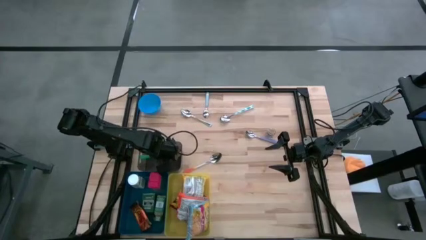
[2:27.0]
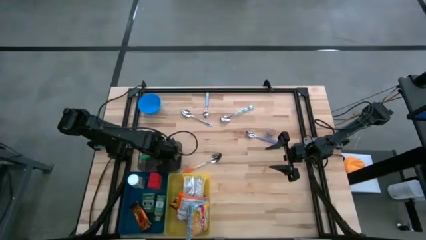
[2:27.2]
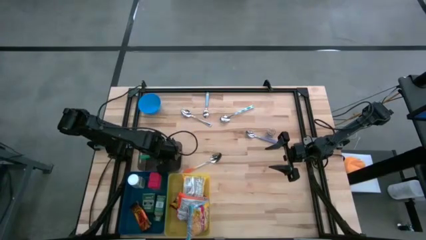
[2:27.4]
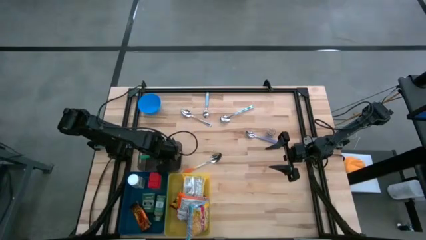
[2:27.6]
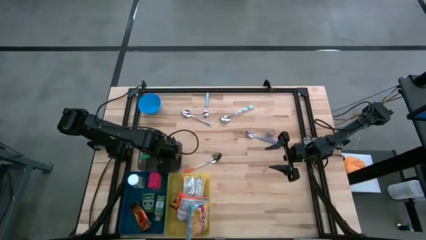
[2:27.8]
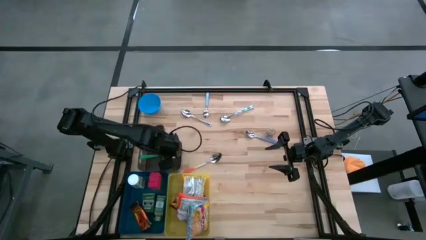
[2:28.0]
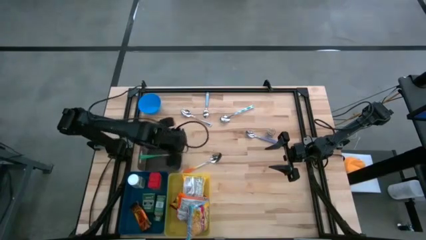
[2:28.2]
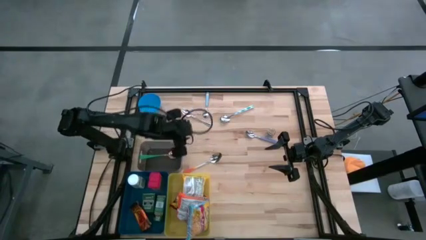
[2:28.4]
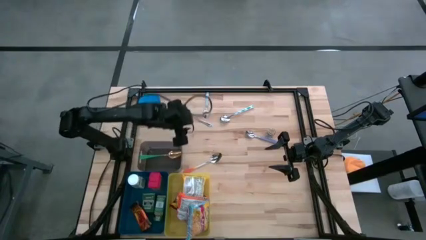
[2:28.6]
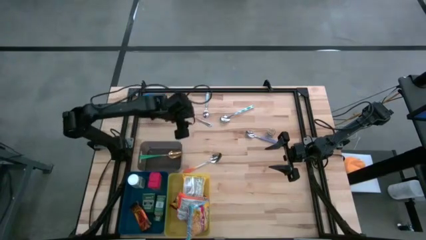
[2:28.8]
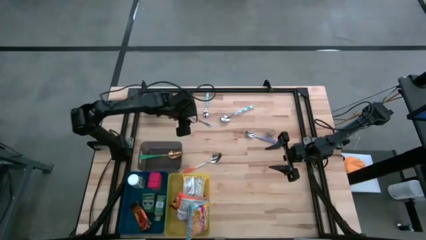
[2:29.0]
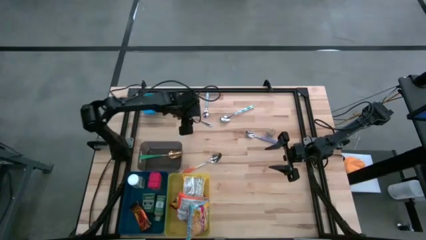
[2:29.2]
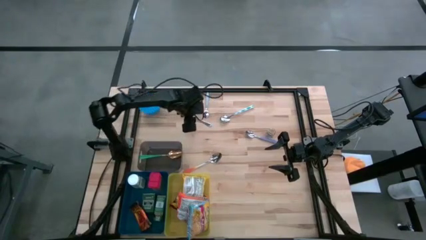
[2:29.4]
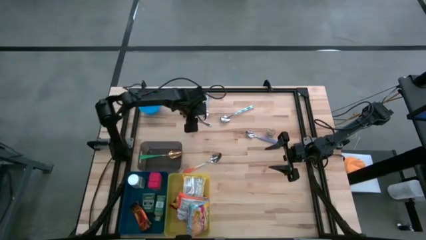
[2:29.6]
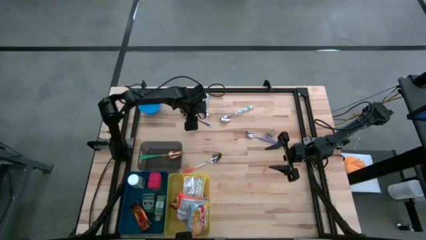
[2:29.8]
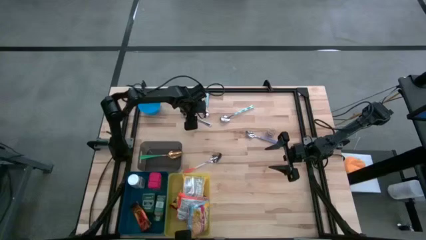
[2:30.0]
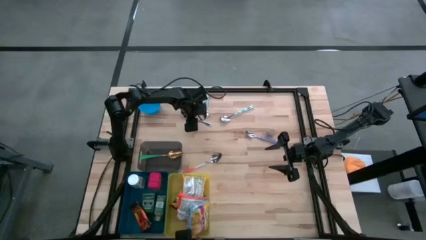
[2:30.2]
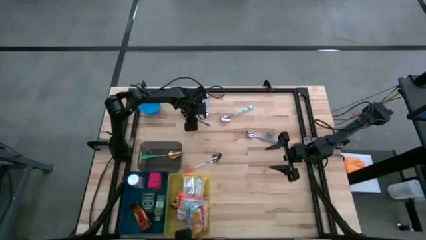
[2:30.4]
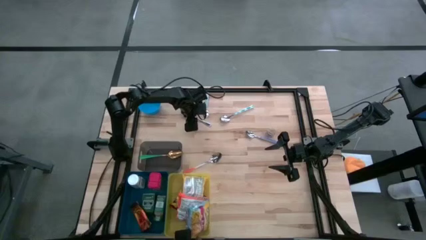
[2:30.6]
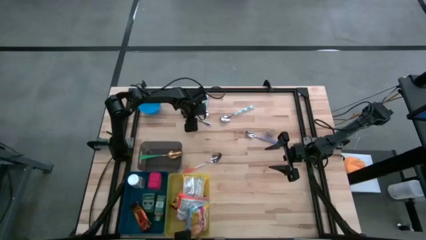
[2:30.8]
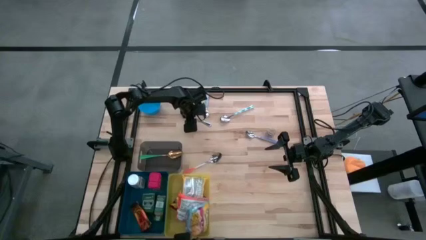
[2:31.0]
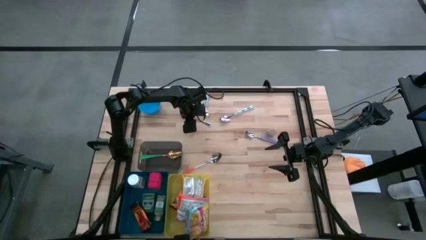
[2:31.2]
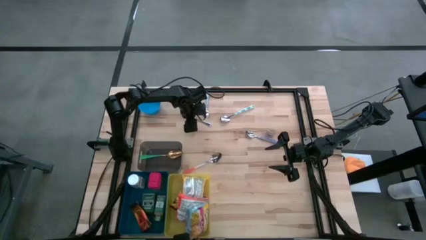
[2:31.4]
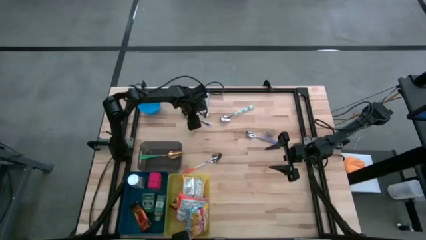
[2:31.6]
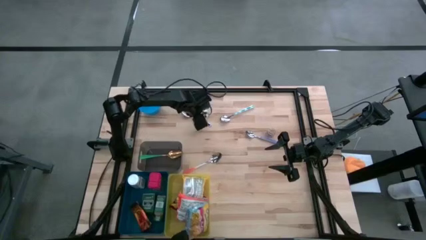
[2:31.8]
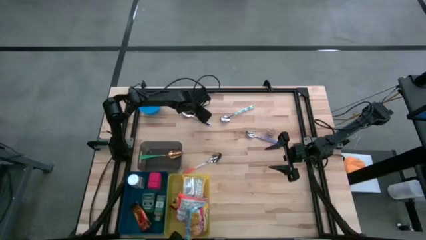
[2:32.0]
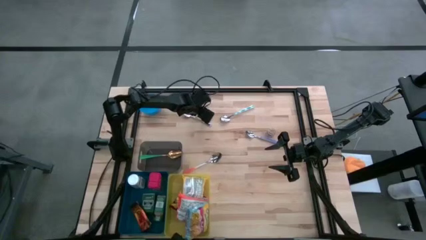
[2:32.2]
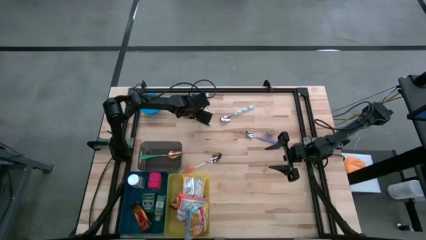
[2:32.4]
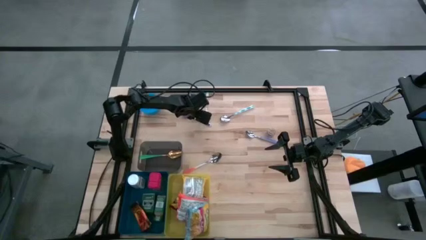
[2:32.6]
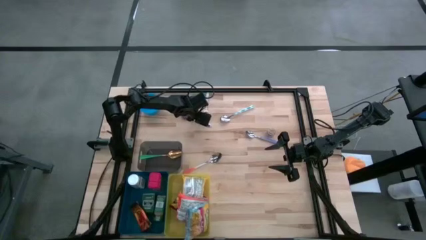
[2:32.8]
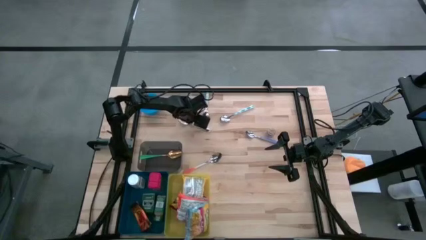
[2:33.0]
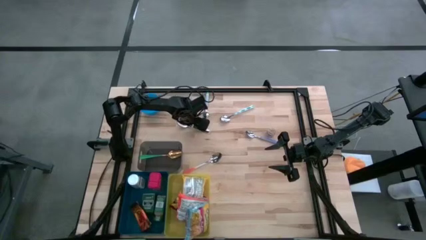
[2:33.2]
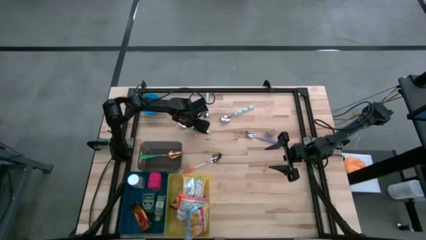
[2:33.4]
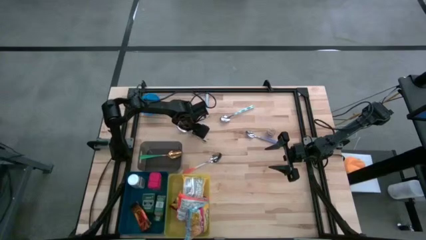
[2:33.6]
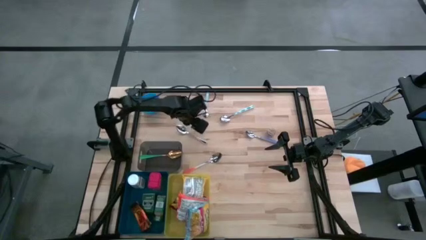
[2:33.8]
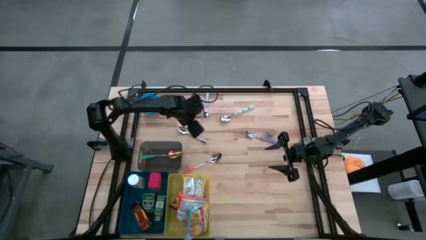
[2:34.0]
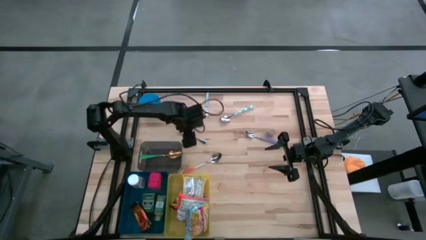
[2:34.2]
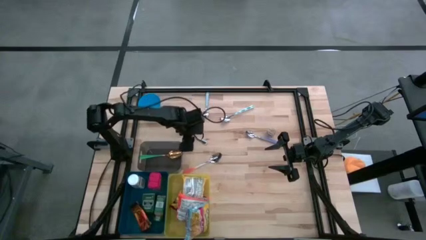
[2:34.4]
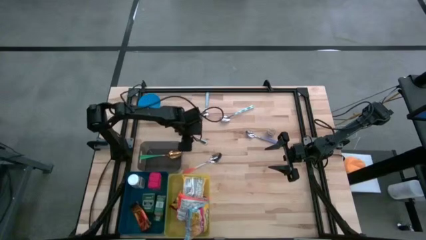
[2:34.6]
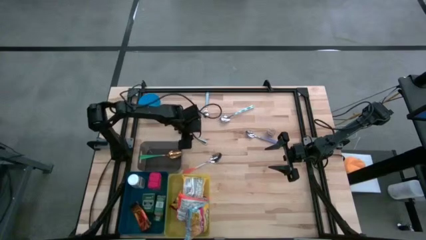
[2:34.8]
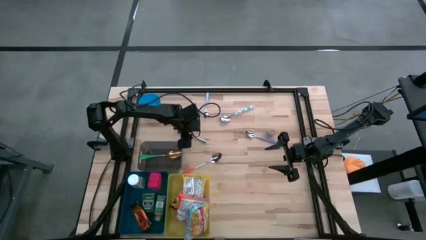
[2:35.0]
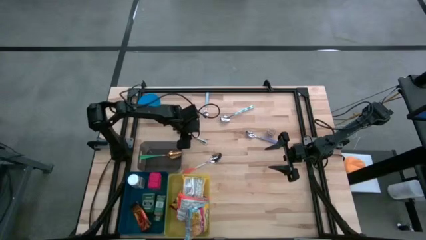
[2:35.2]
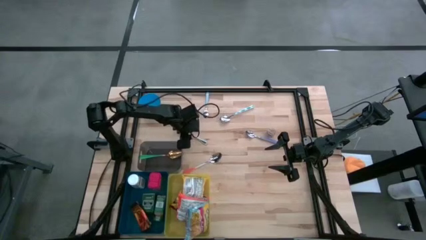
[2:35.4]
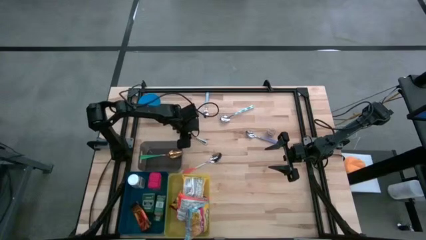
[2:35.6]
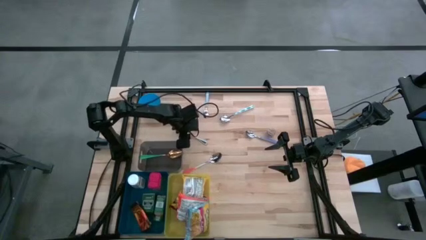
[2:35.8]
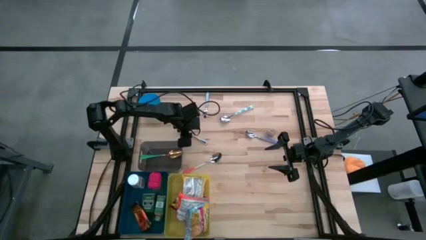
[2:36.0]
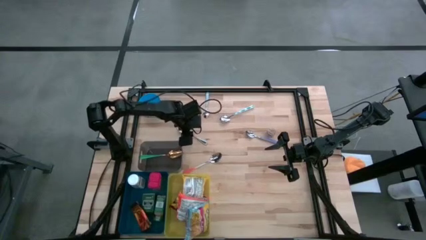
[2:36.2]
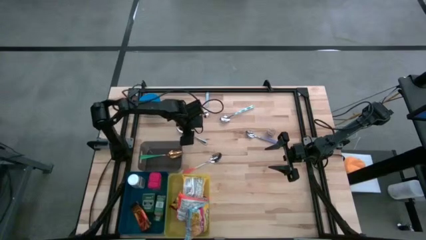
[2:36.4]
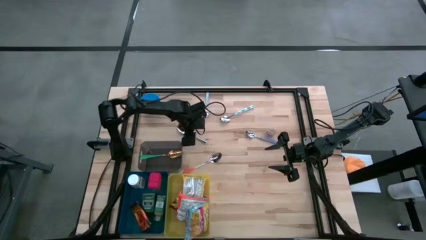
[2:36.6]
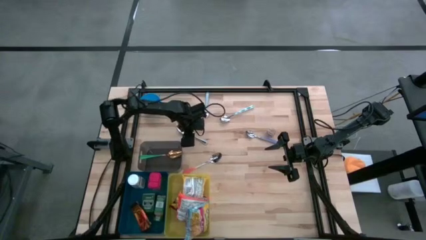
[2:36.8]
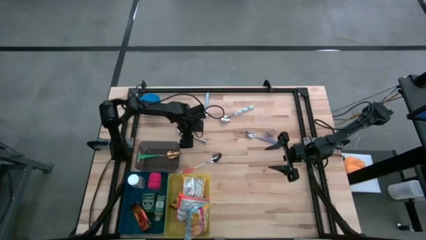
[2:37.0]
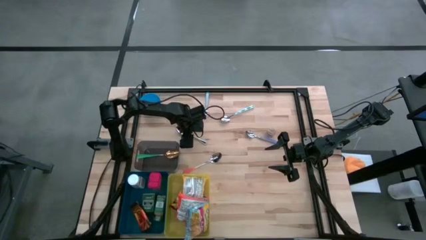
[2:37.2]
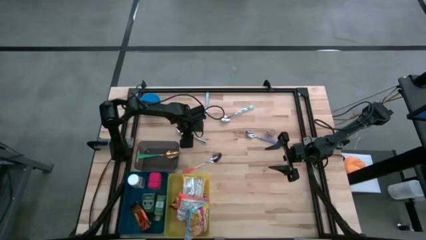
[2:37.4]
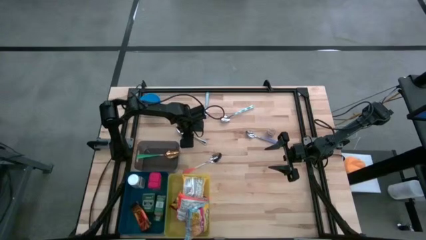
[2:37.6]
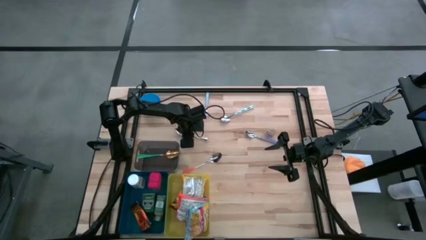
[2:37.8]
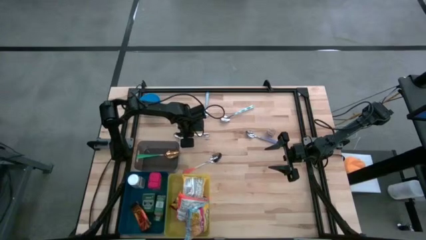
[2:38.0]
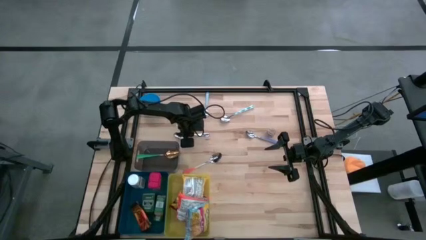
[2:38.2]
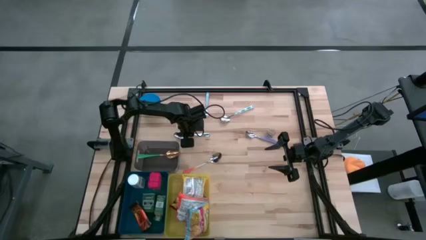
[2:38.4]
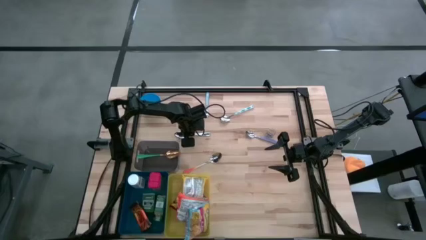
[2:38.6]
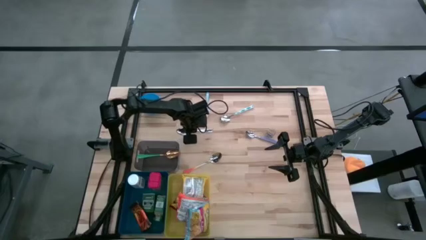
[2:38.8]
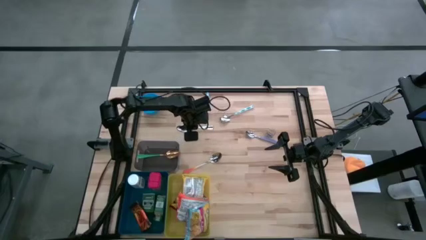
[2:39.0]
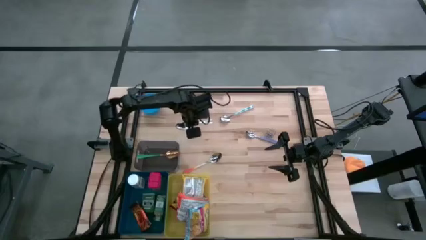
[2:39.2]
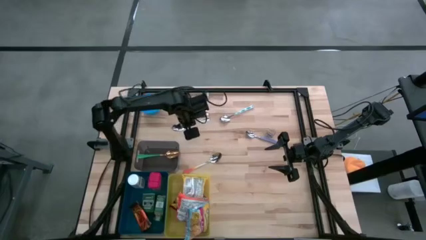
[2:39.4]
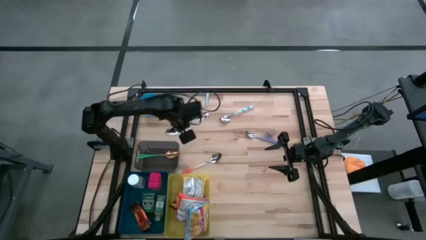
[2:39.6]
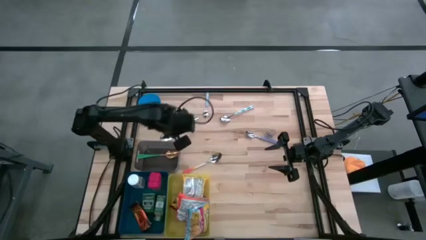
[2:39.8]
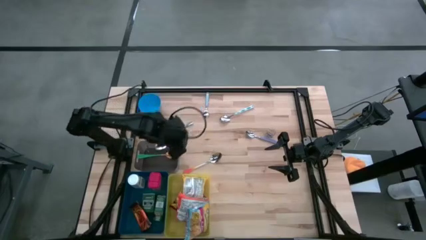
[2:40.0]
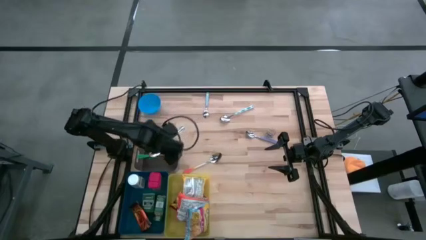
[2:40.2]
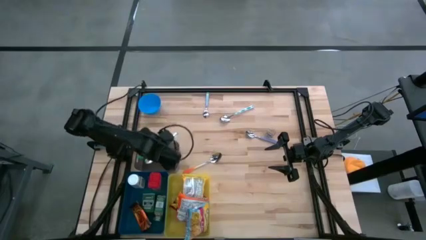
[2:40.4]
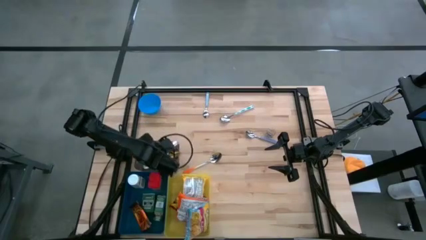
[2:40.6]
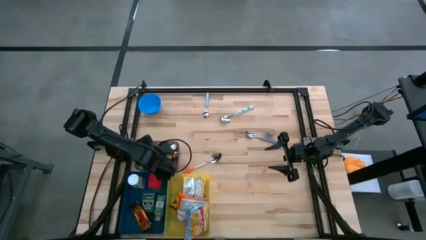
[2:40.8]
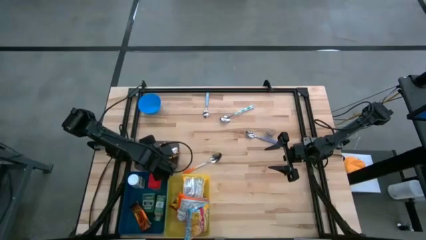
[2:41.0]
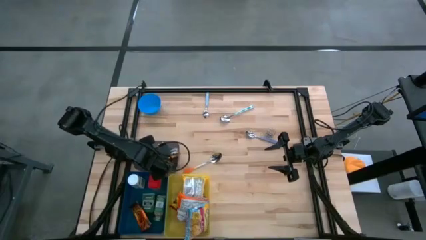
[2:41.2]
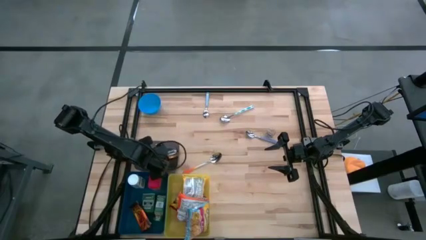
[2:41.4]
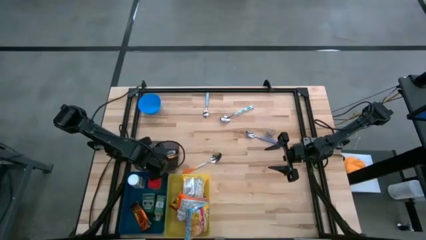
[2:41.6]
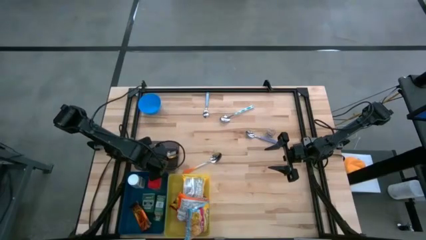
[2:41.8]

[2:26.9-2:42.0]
Put the silver spoon into the gray bin
